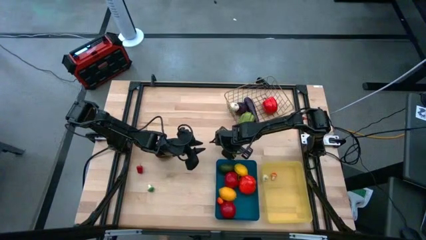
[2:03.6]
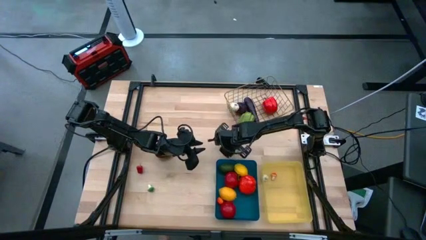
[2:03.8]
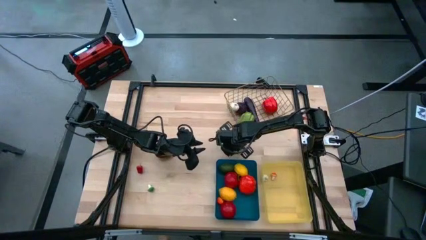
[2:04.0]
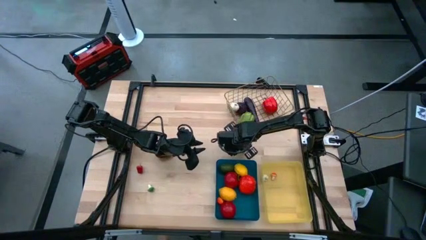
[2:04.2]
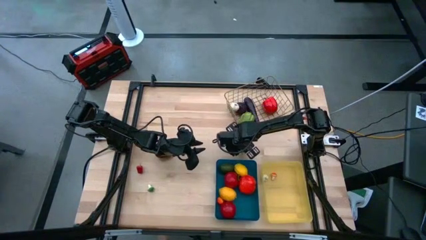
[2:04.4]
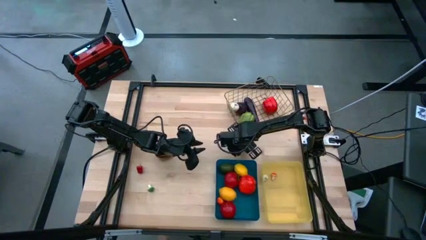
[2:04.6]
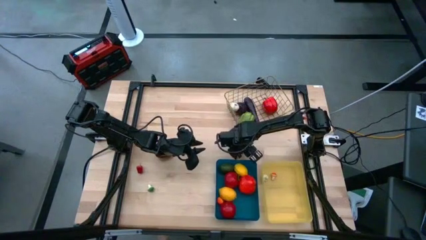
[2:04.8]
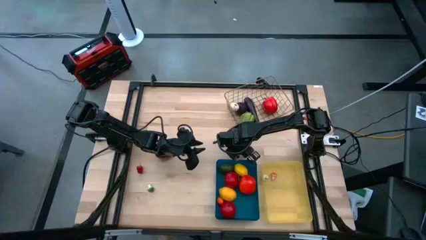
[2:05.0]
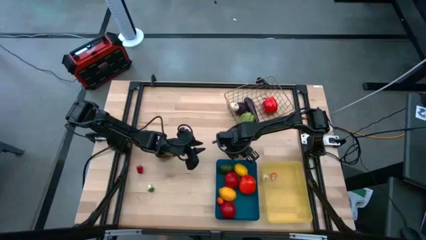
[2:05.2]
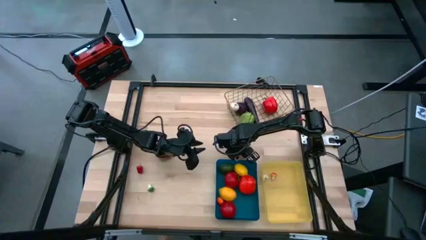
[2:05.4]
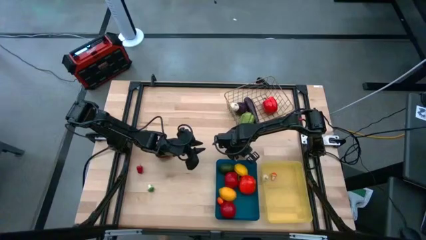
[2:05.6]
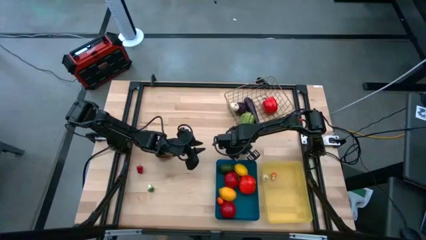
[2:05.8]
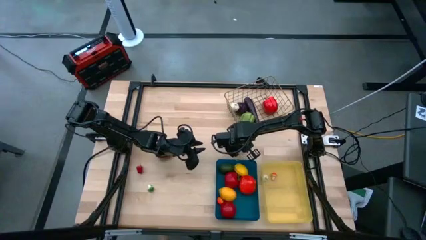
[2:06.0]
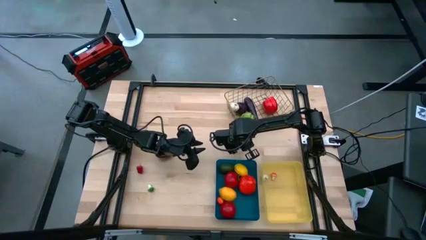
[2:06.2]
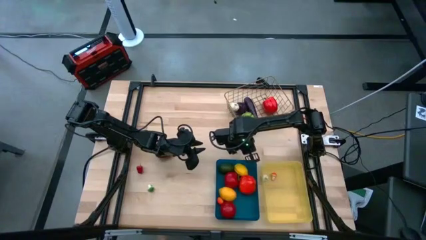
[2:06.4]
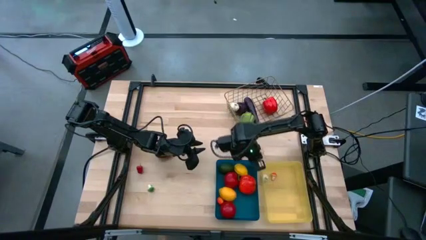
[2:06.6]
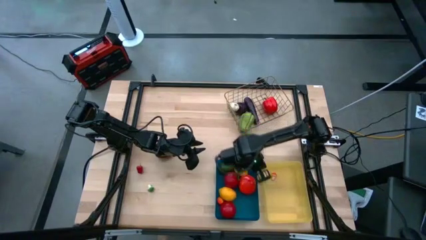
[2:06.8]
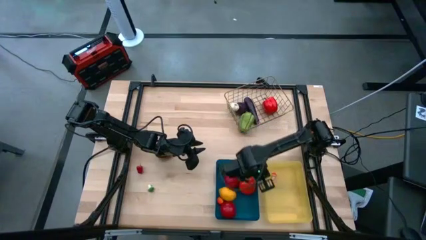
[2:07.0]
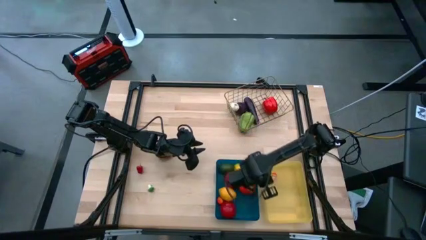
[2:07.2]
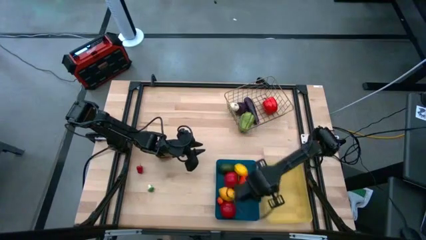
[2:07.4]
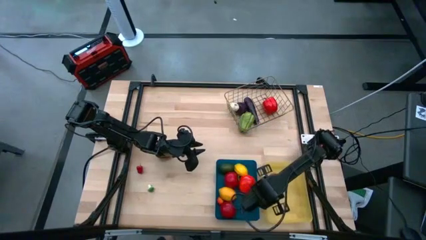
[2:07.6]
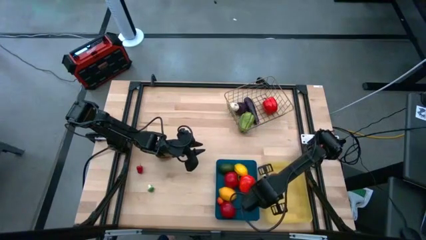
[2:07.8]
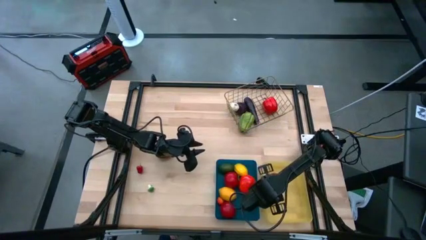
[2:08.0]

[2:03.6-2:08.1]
Task: Sort produce into baskets
Put the top green mushroom into the yellow bin

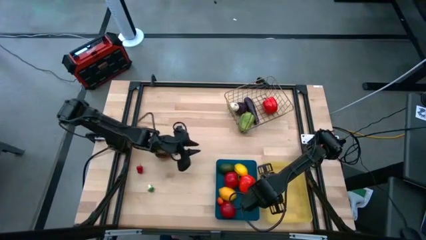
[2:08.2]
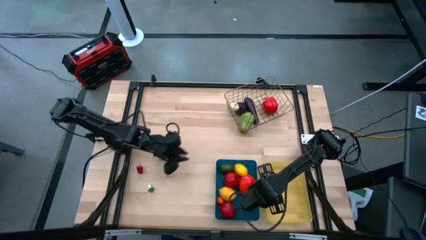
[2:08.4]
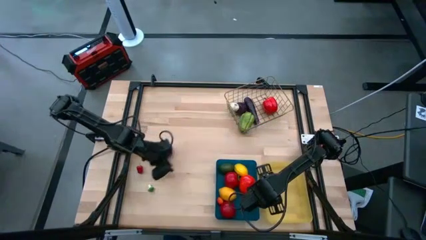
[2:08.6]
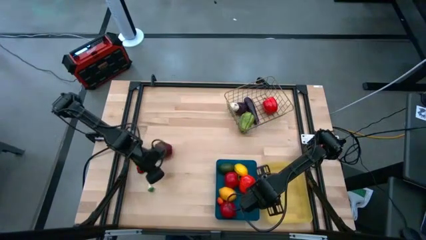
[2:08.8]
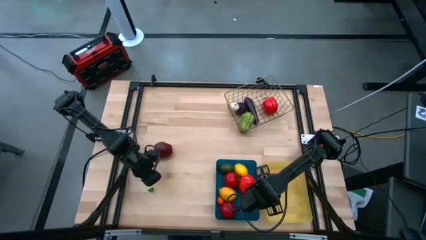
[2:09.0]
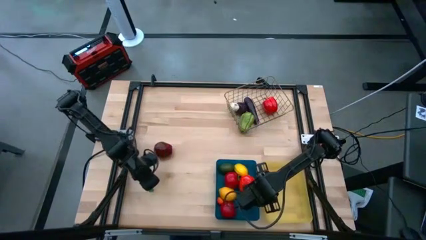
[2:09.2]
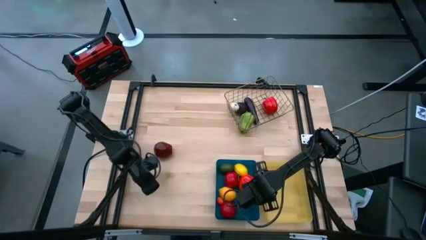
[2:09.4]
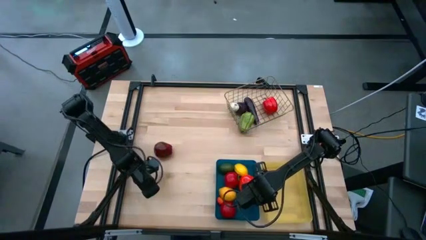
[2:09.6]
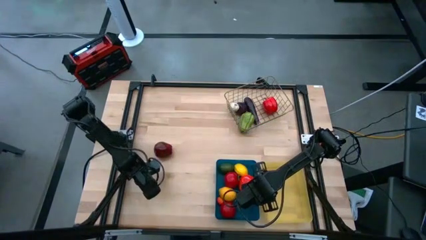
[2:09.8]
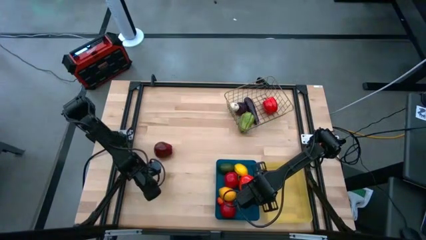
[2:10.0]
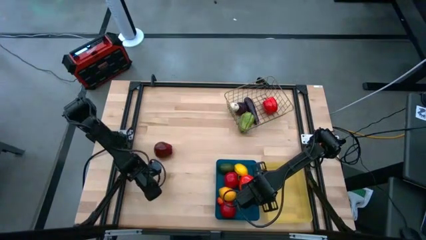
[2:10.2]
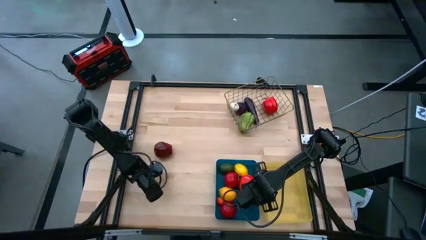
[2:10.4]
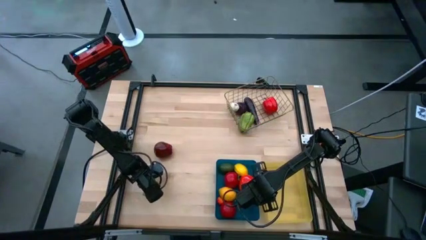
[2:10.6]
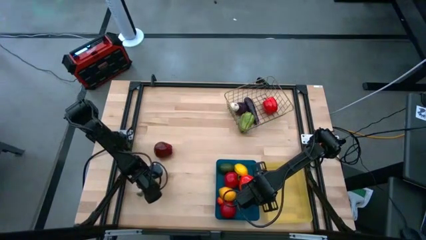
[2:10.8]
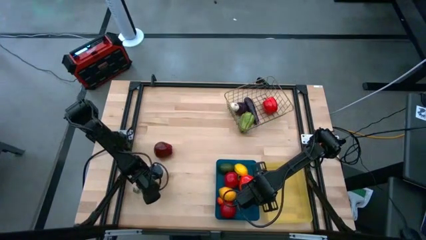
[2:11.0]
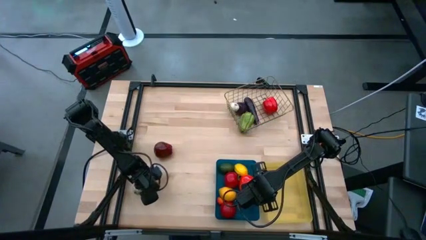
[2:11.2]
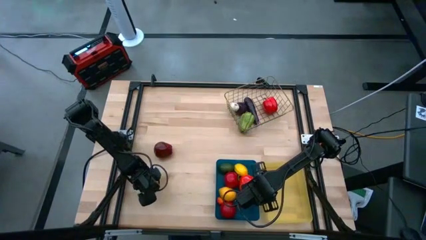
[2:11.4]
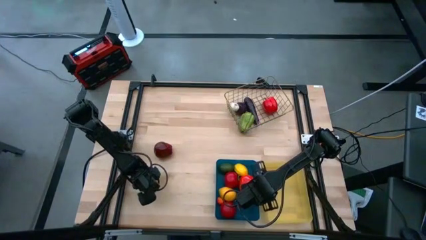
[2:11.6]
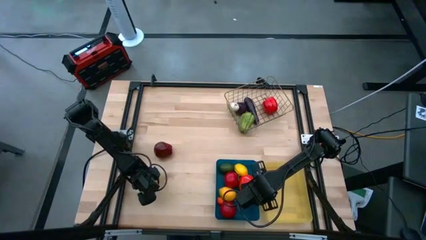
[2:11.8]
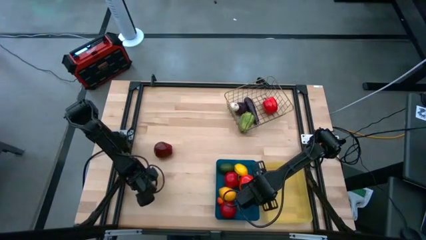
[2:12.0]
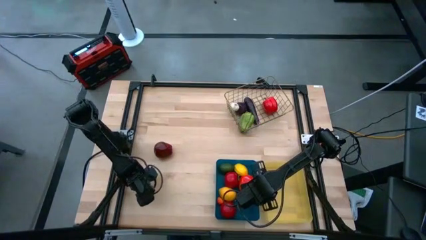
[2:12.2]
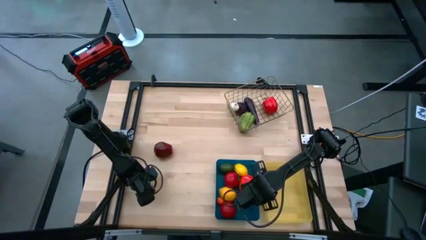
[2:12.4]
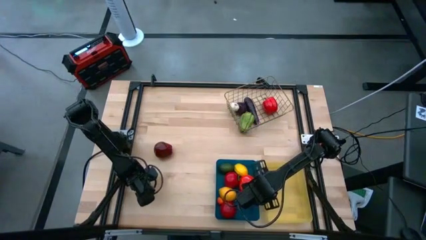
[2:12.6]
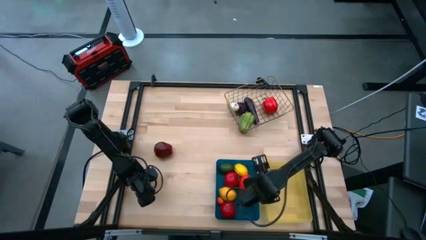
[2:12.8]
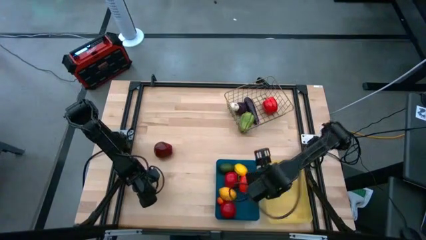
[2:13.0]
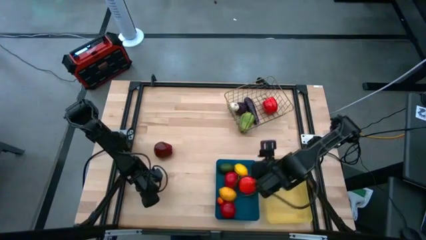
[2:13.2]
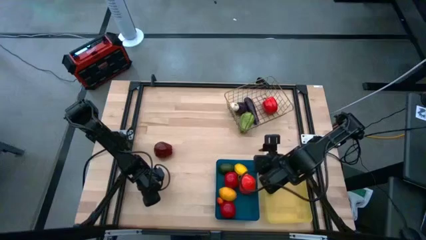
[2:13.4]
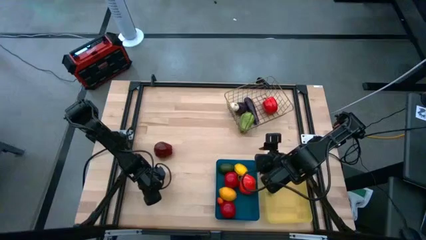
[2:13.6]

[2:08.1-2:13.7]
Put the green mushroom into the yellow bin

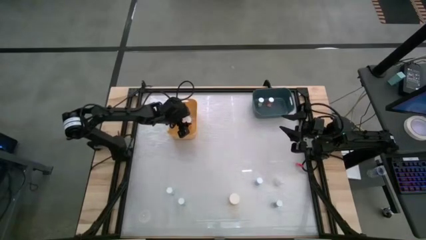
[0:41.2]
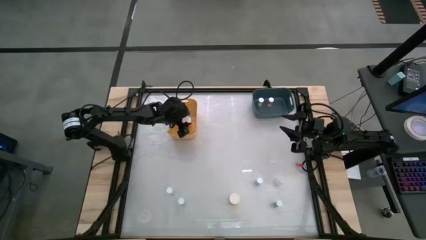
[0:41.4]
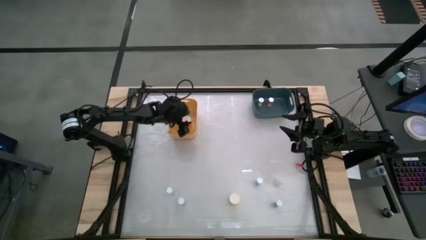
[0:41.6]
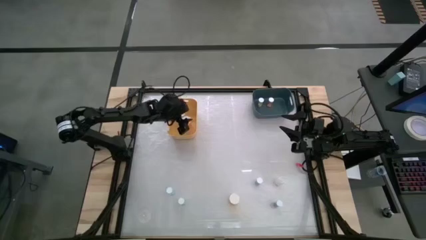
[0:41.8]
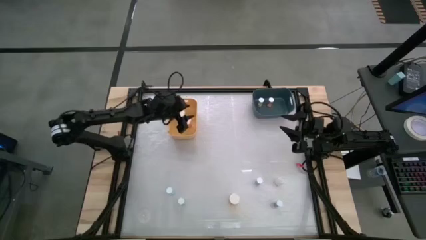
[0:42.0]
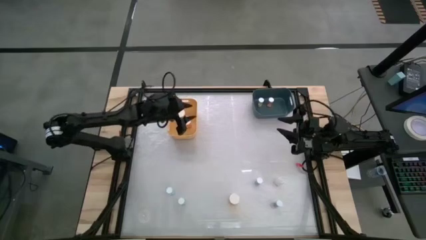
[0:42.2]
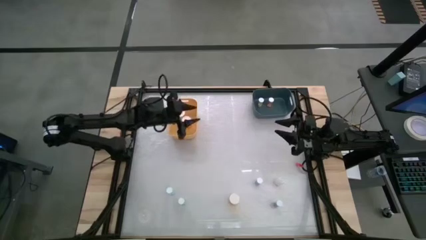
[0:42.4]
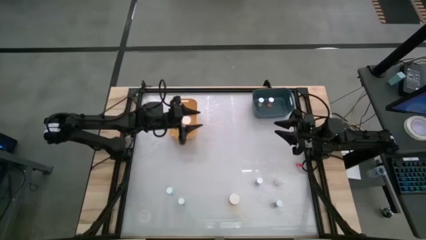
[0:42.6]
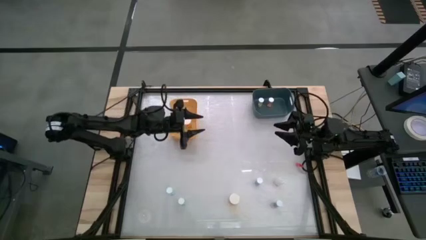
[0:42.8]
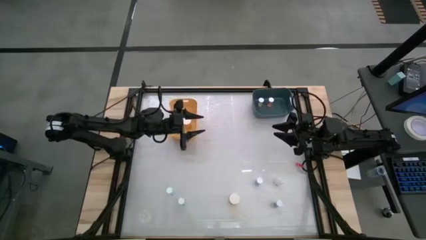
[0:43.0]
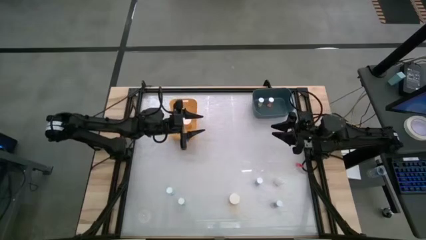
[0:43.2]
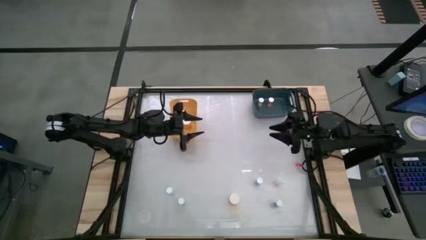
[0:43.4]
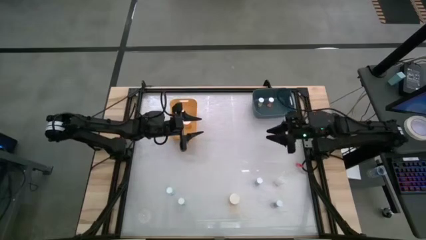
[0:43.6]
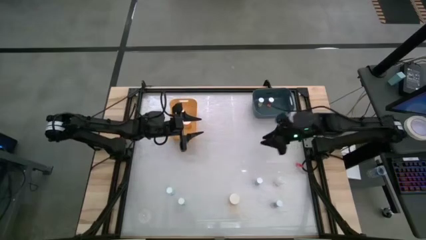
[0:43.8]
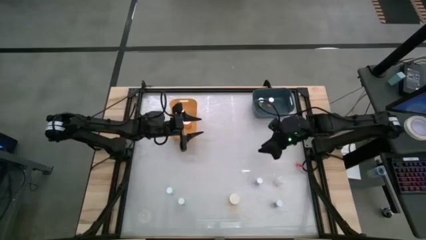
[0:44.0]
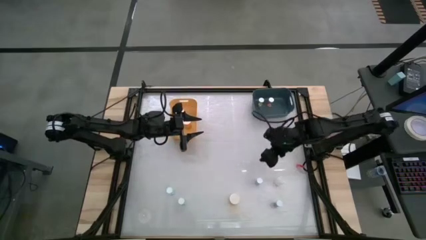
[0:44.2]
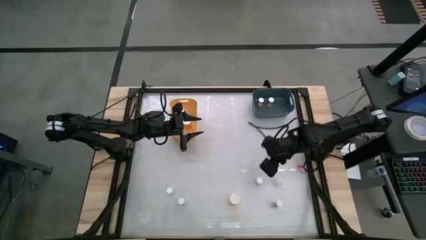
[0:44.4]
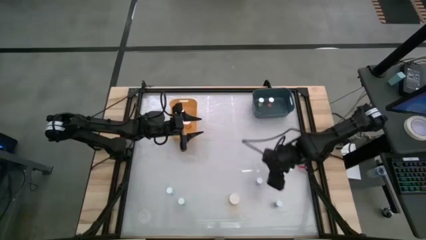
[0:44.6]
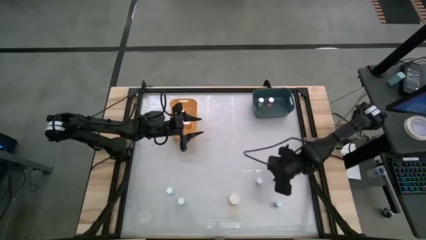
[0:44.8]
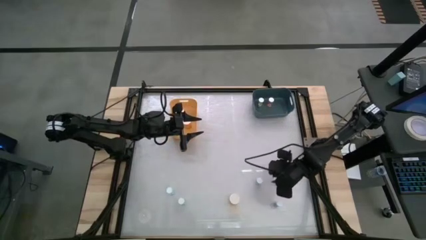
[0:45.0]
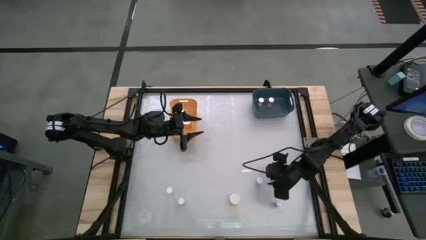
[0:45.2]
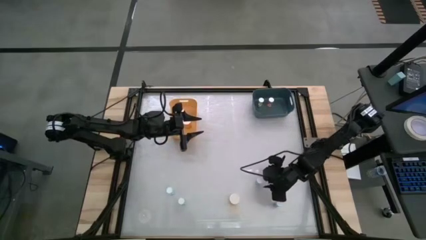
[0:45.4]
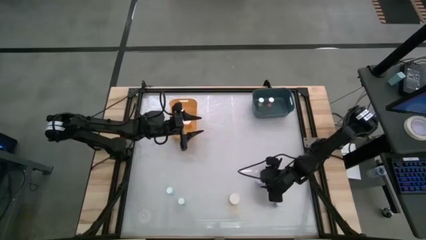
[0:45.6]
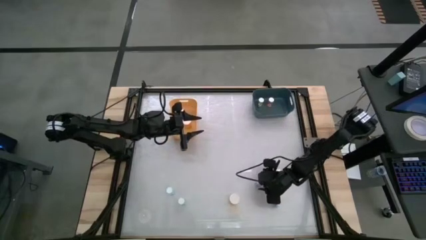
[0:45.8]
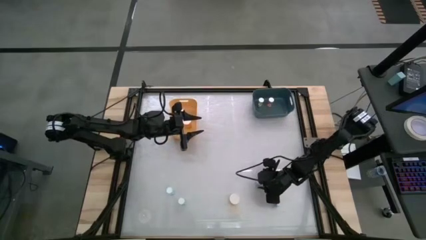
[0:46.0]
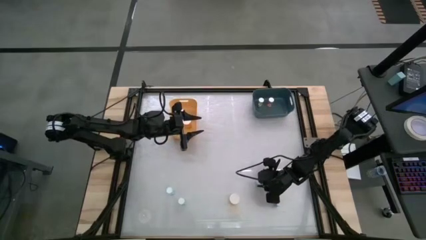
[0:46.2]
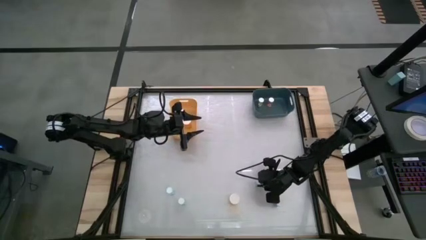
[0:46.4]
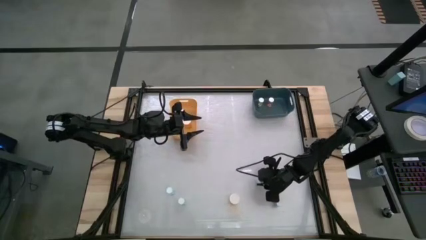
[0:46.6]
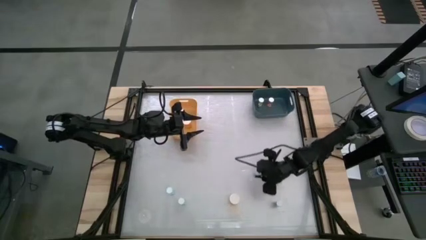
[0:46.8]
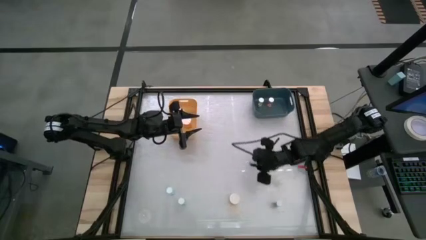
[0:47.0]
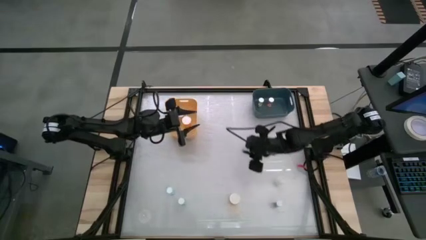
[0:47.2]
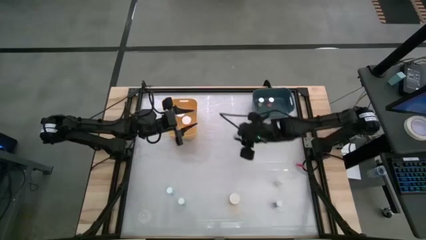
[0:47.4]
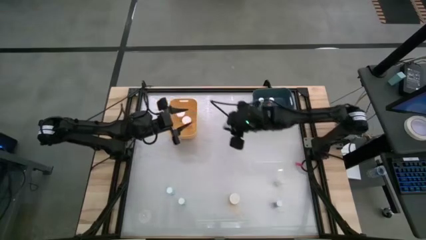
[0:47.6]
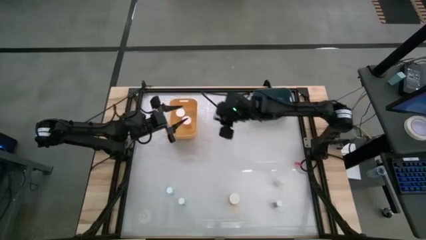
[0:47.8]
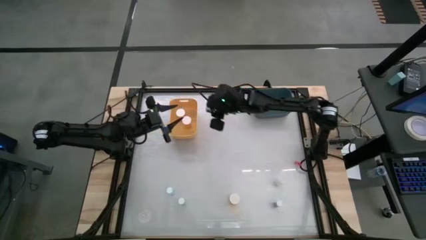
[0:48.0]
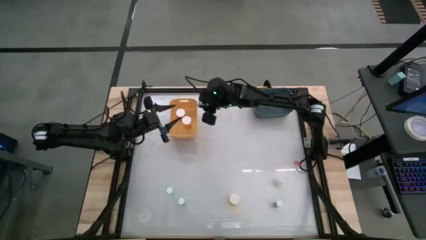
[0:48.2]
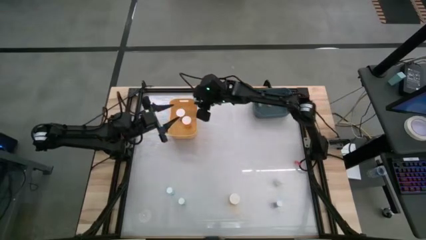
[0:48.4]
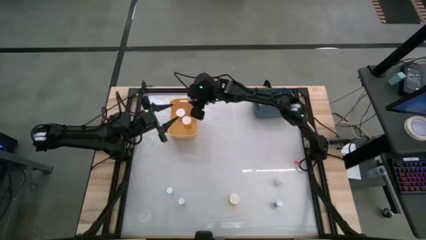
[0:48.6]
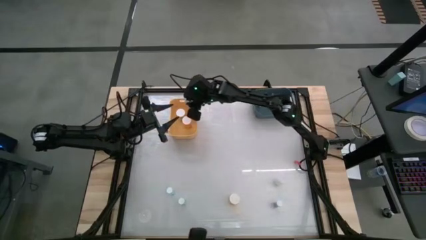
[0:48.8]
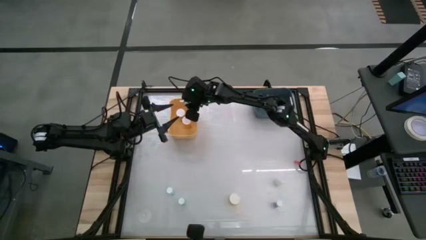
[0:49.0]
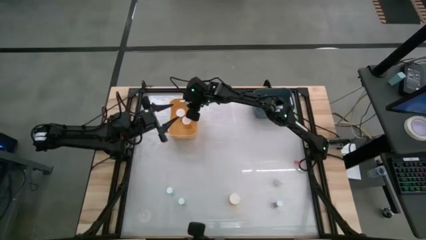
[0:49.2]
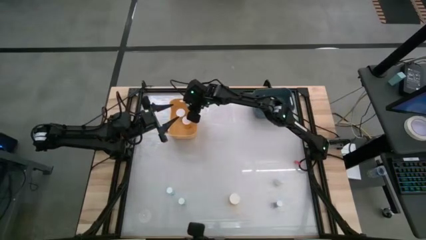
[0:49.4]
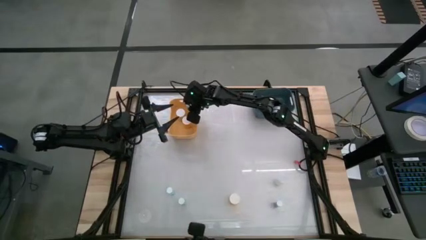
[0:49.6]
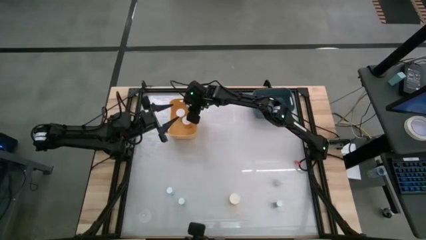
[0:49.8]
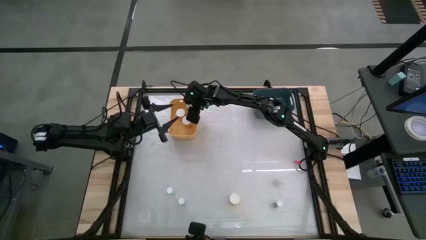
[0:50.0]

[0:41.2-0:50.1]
Task: Pick and place medicine bottles into bin by pill shape (circle, oval)
Put the orange bottle pill into the yellow bin
